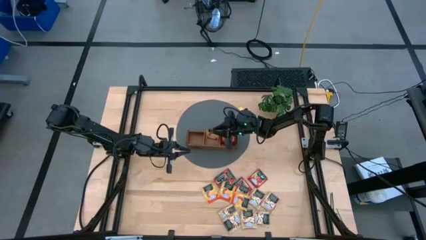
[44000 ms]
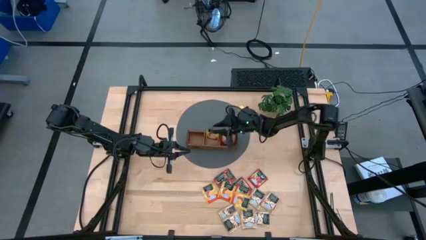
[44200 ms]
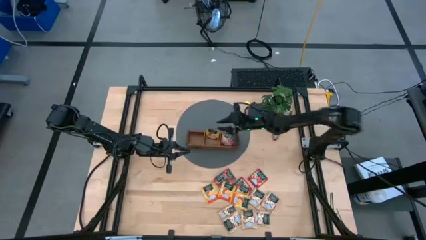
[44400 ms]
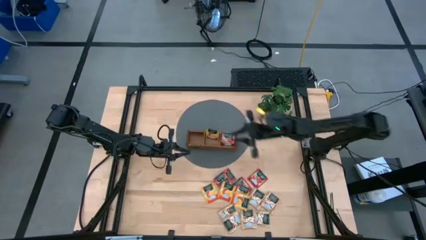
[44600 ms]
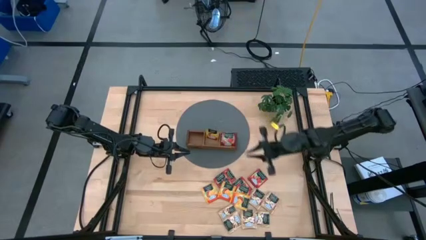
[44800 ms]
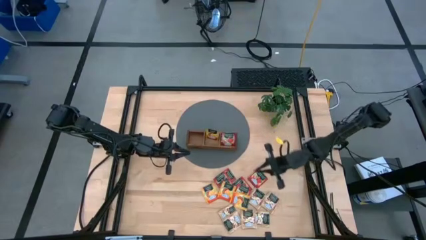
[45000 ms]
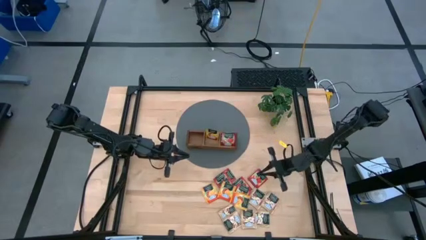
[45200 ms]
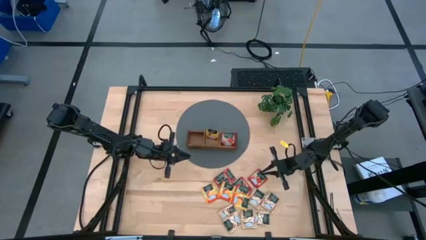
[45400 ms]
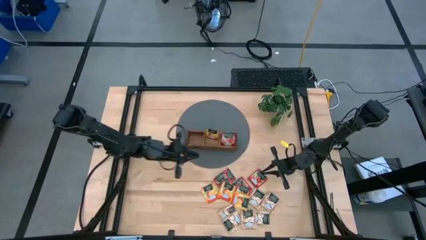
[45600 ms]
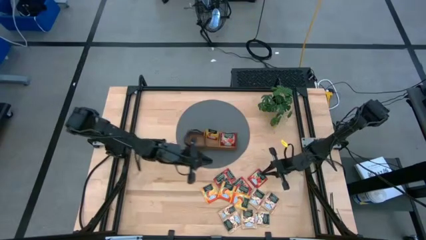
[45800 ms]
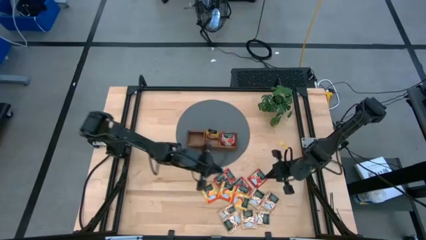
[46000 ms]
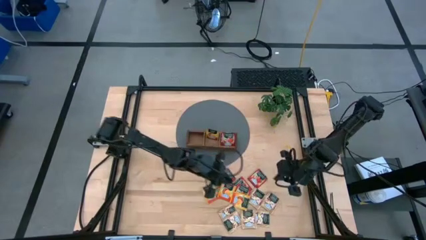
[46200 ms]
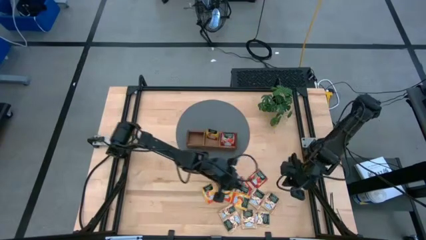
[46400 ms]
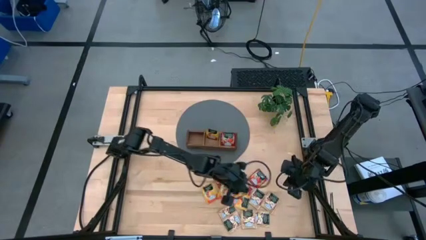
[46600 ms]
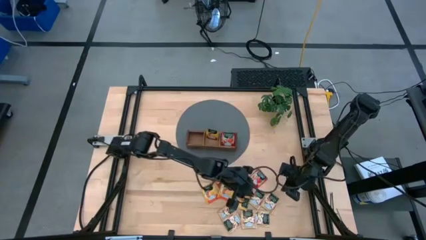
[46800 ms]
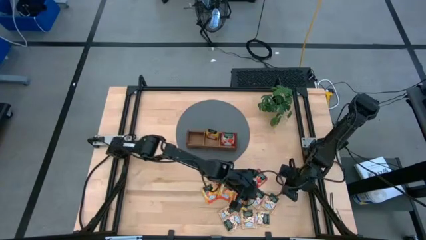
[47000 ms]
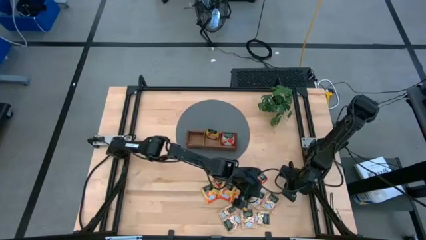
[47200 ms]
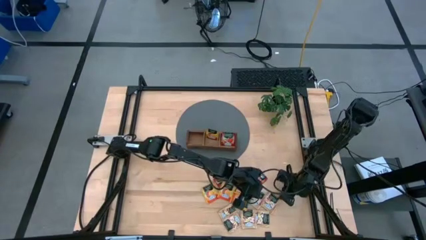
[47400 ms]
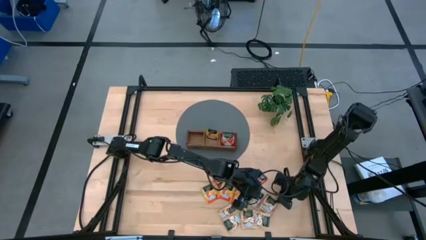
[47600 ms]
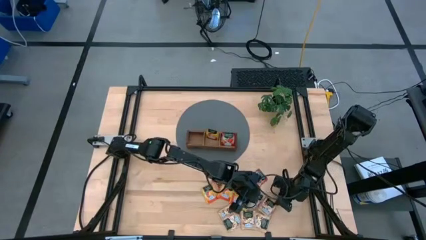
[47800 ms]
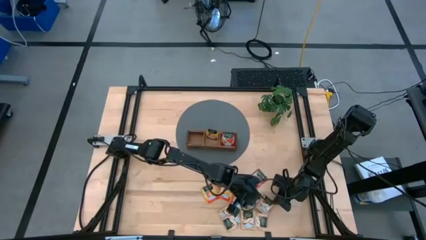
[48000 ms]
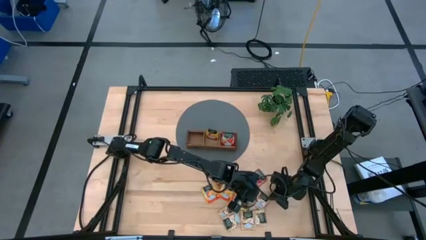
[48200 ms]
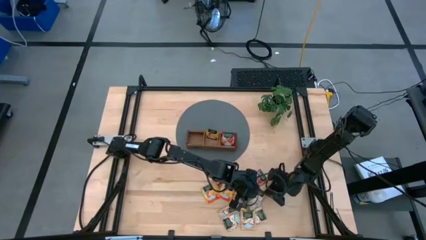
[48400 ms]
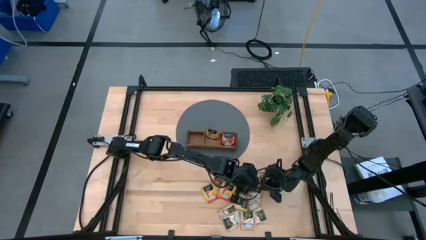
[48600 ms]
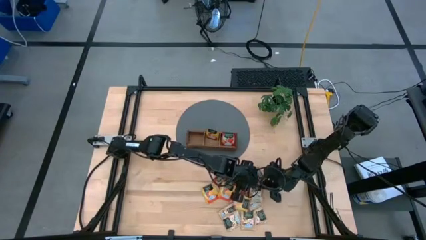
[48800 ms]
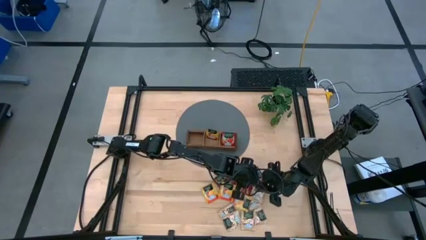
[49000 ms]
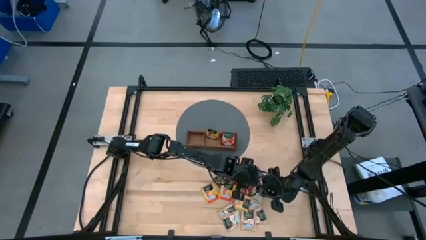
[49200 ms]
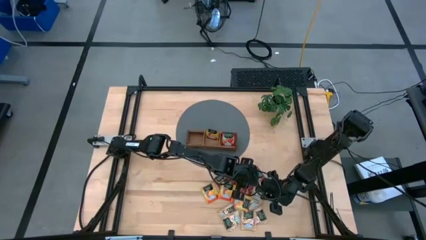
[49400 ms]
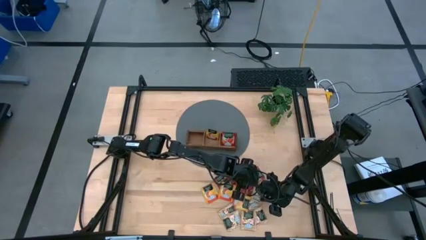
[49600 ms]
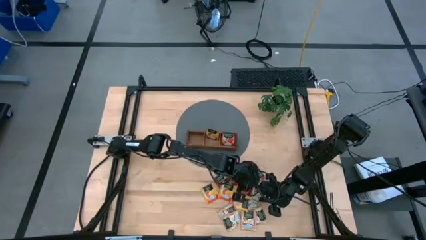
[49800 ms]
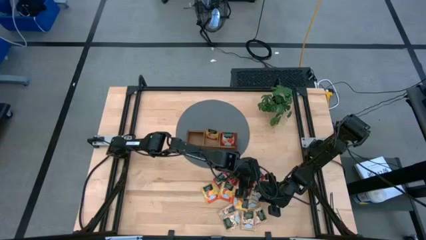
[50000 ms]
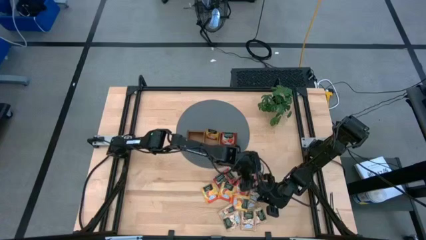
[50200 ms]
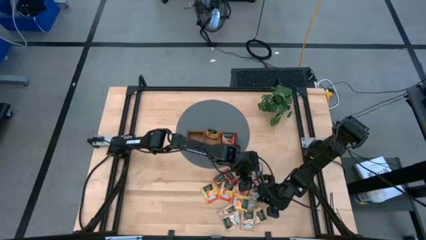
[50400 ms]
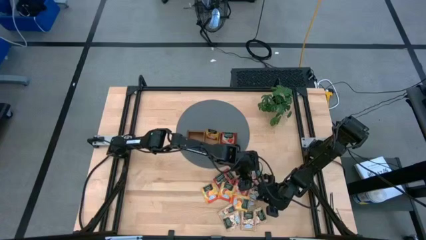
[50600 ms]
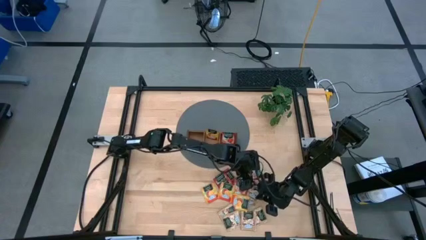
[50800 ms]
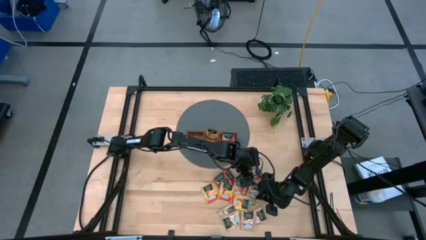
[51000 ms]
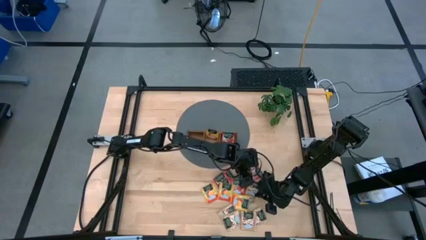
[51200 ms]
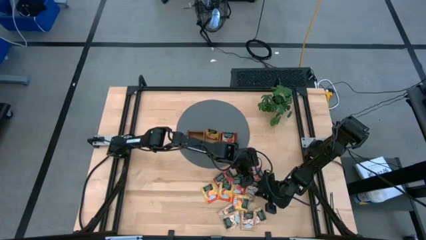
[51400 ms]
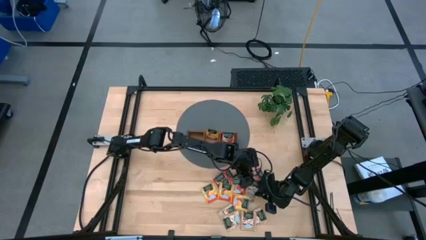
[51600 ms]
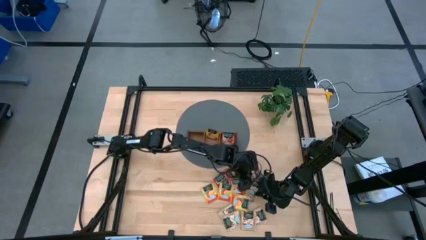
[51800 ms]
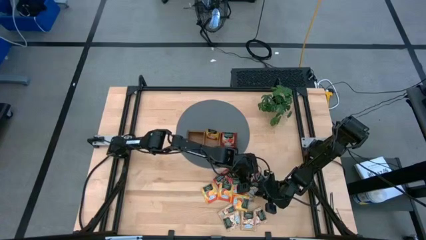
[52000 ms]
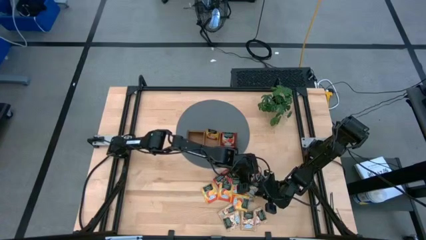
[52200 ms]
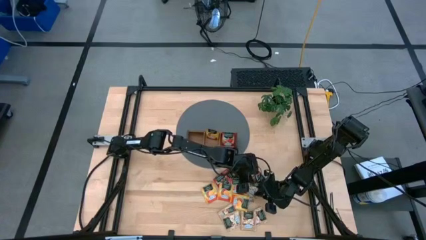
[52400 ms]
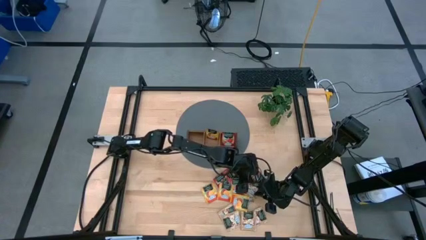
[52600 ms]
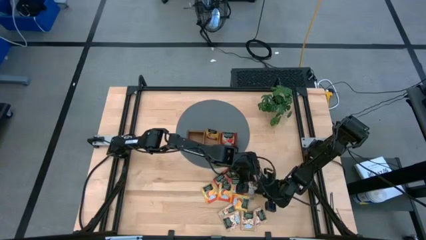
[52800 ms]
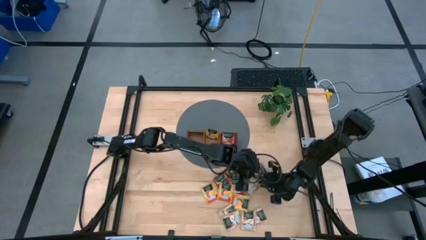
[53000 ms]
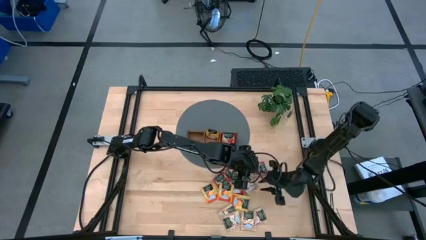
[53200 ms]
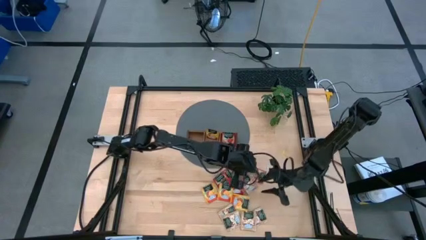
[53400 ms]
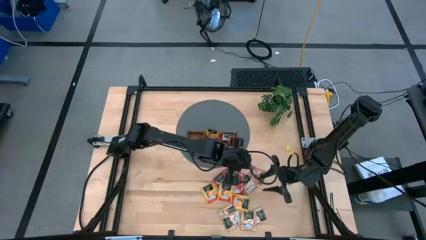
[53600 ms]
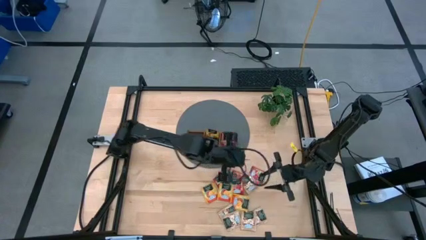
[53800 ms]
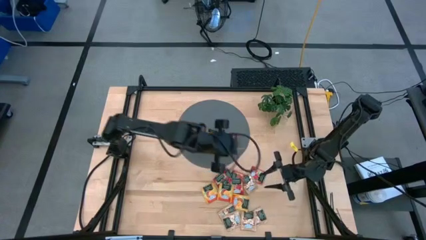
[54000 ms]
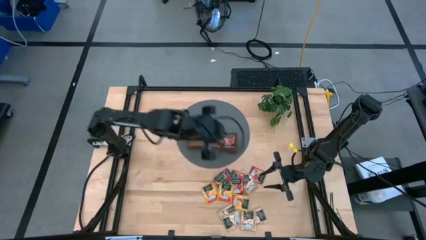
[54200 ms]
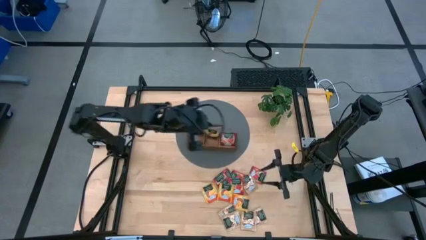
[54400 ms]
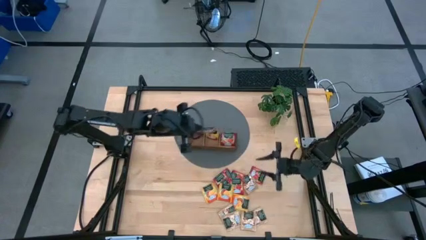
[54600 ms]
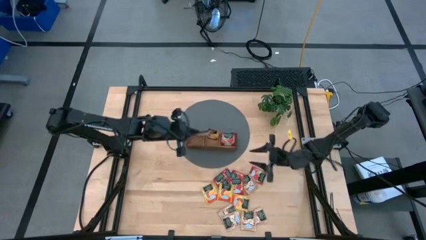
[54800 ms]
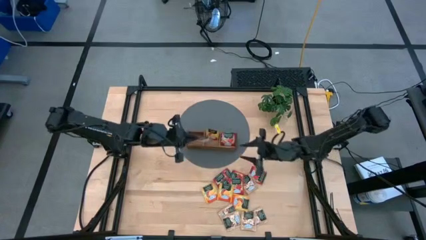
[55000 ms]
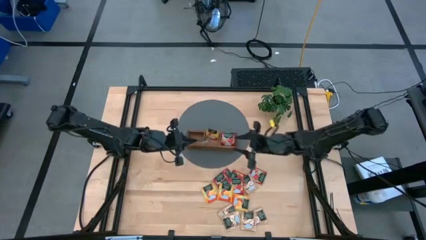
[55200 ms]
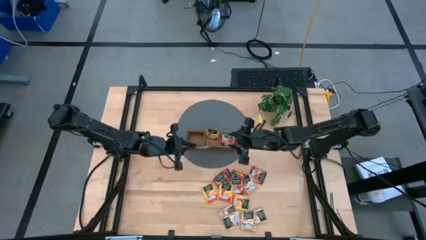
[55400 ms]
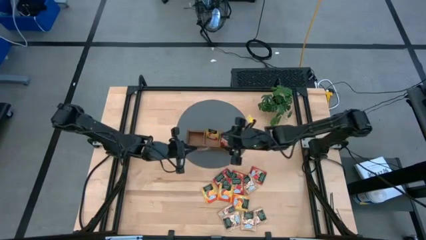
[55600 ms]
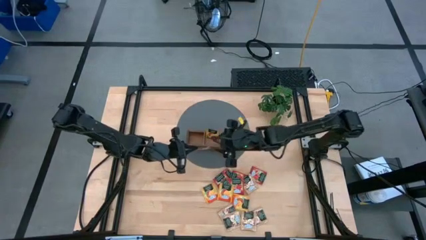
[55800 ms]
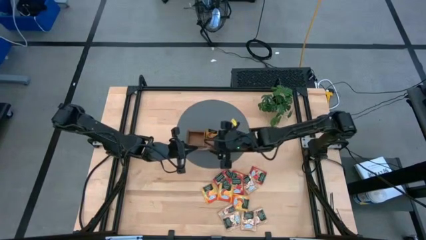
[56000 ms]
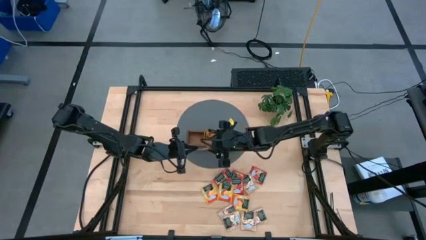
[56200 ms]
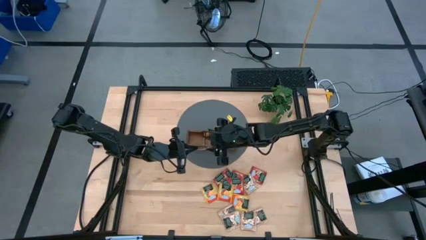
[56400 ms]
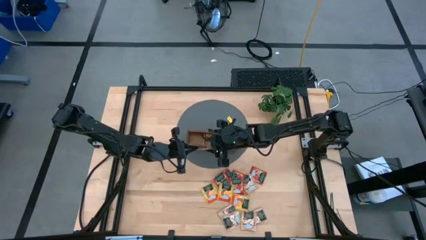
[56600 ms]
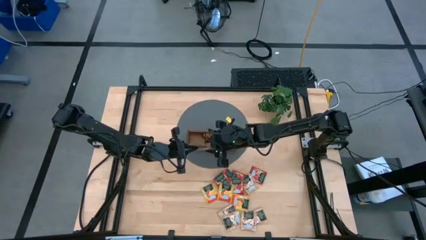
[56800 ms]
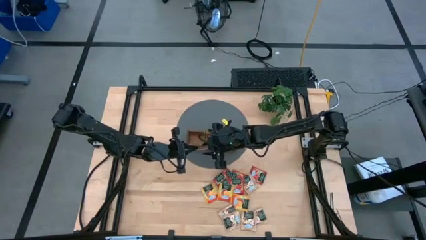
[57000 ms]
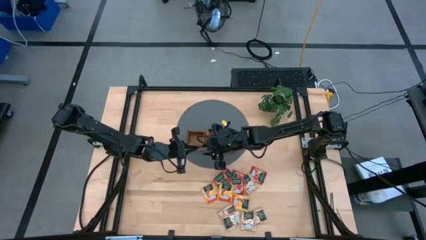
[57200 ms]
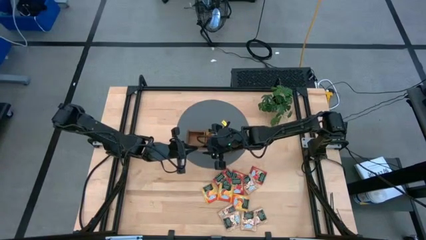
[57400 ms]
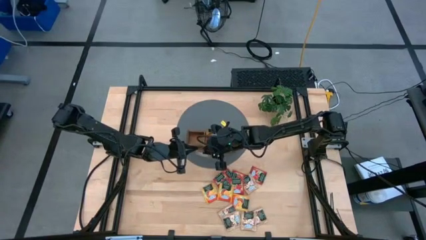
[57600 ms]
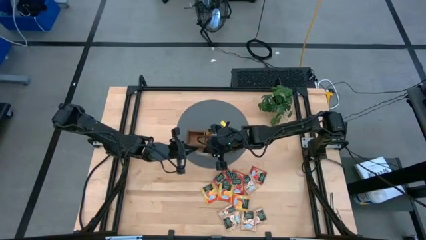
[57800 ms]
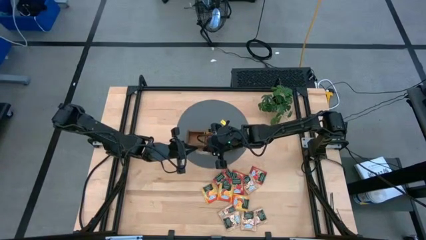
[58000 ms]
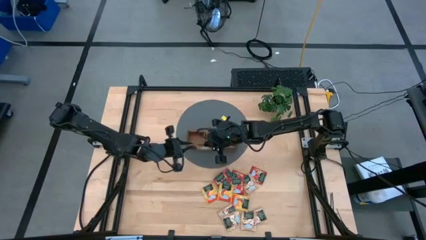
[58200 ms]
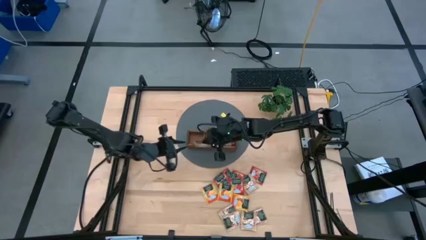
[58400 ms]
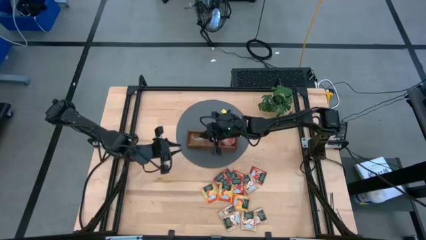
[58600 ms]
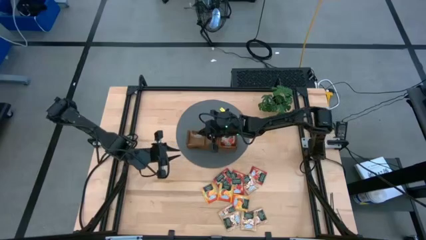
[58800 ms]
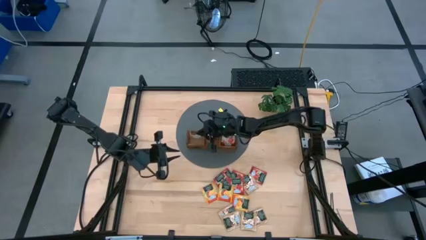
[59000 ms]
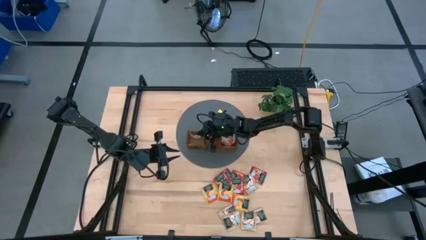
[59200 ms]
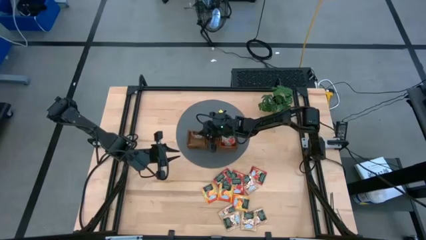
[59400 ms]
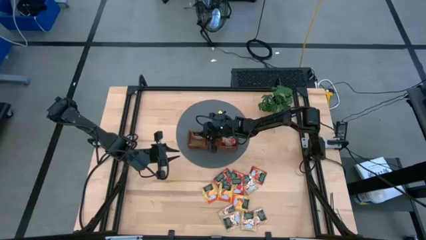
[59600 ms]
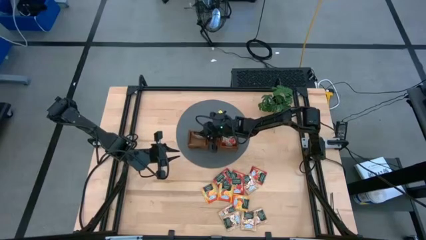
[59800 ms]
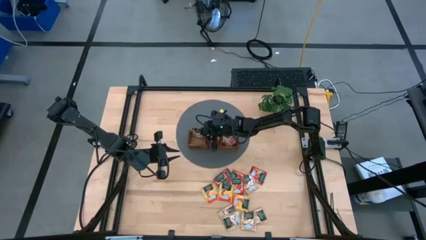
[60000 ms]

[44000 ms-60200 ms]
Task: Pick & Place Tea
Put the brown tea bag into the left section of the wooden organizer
